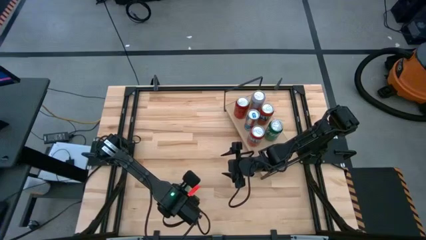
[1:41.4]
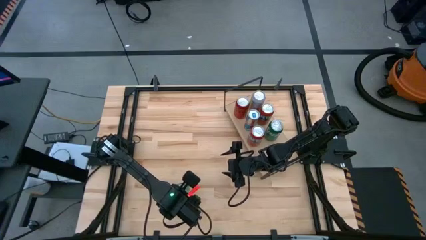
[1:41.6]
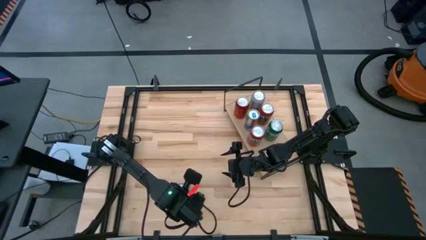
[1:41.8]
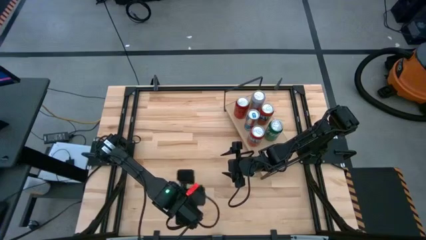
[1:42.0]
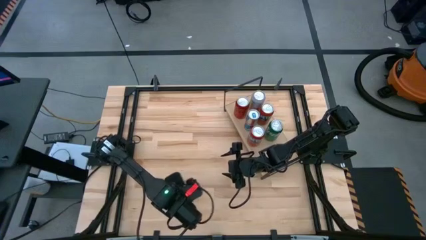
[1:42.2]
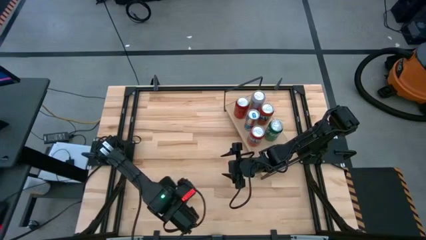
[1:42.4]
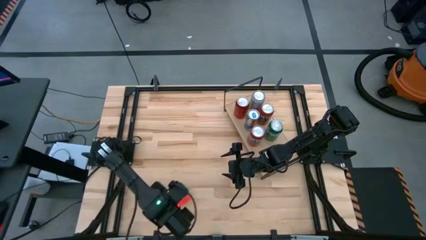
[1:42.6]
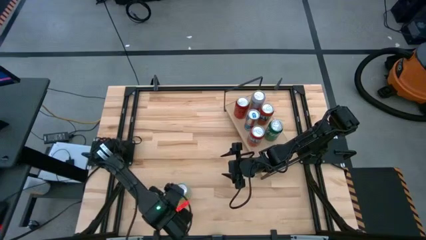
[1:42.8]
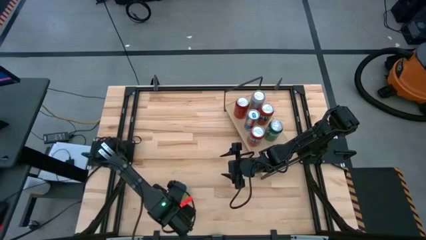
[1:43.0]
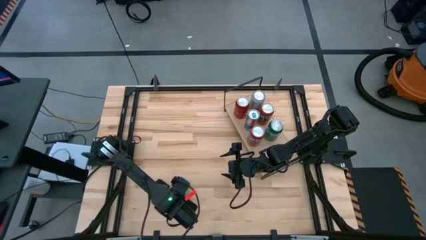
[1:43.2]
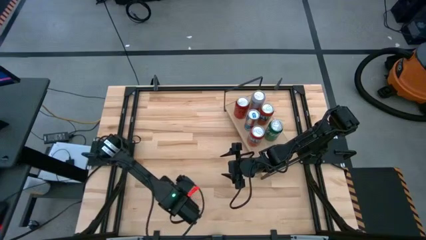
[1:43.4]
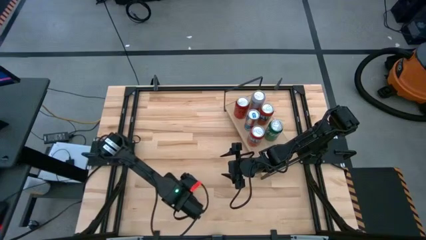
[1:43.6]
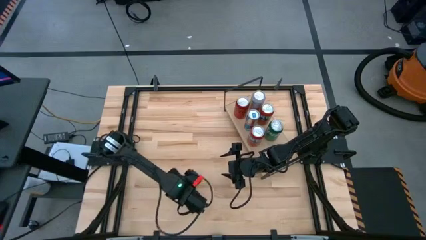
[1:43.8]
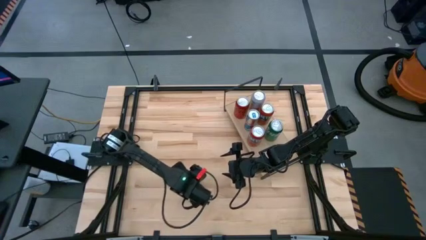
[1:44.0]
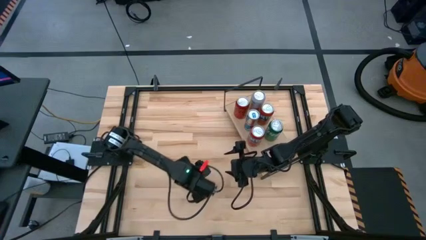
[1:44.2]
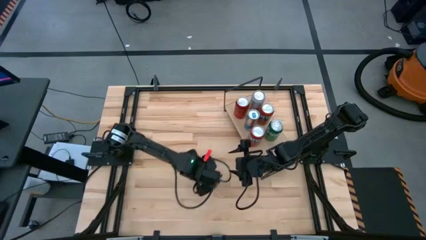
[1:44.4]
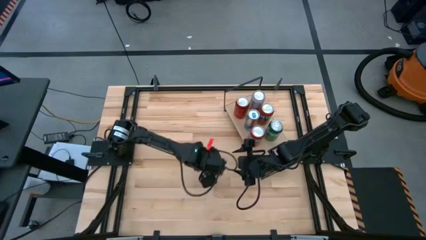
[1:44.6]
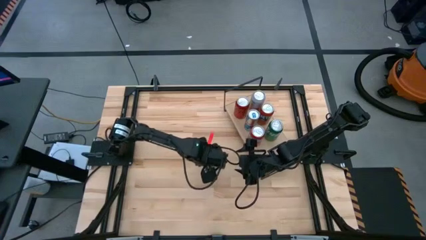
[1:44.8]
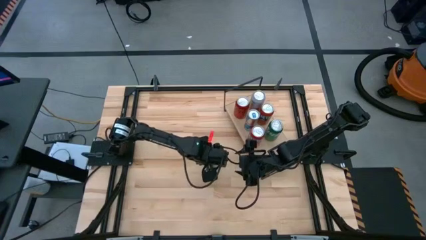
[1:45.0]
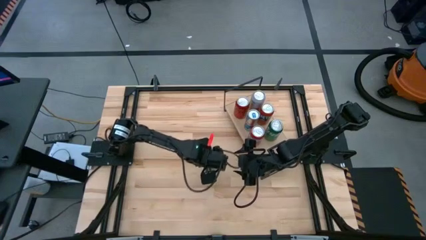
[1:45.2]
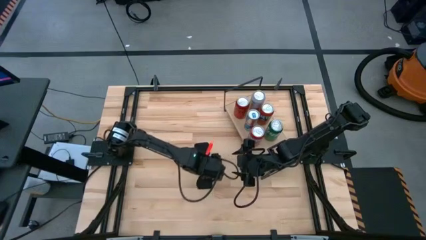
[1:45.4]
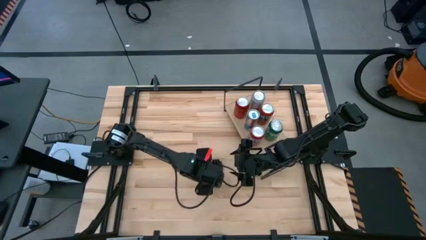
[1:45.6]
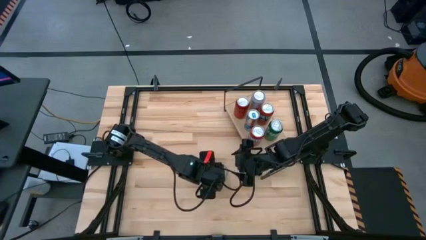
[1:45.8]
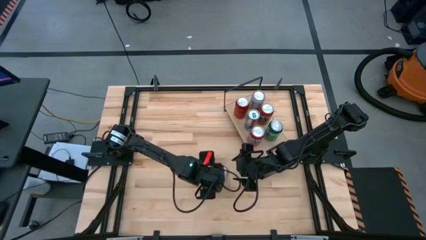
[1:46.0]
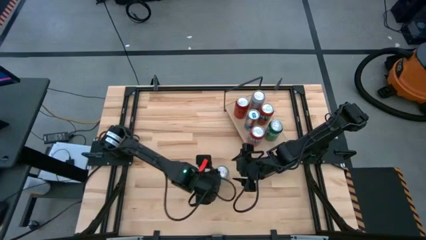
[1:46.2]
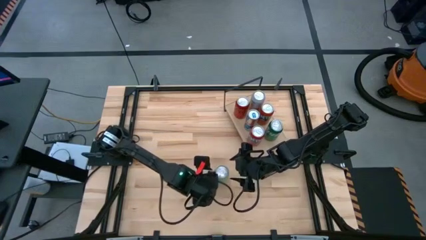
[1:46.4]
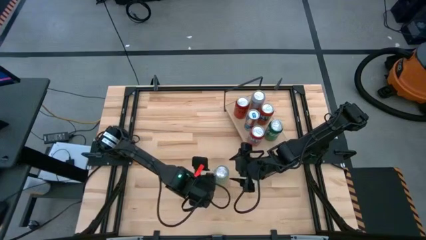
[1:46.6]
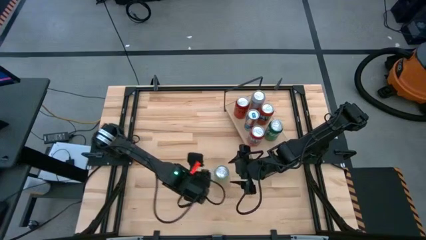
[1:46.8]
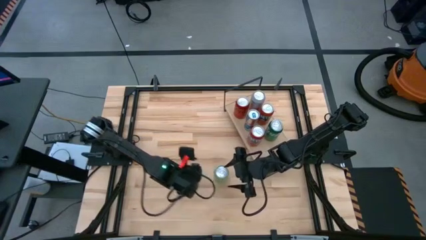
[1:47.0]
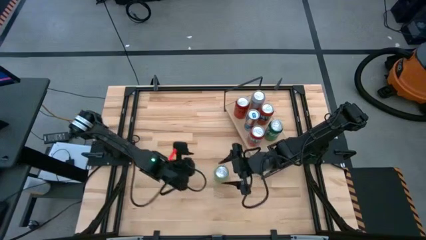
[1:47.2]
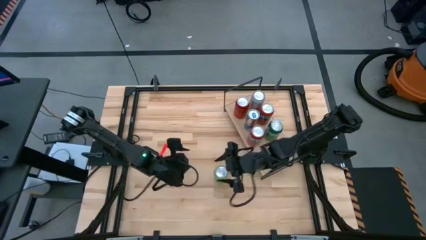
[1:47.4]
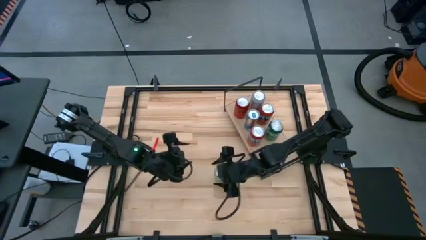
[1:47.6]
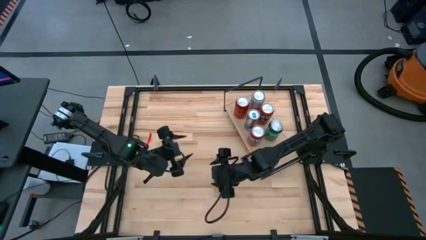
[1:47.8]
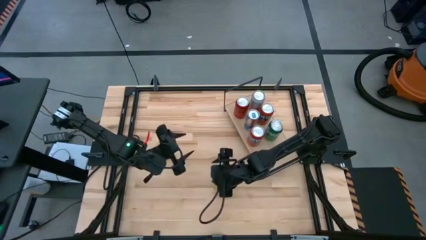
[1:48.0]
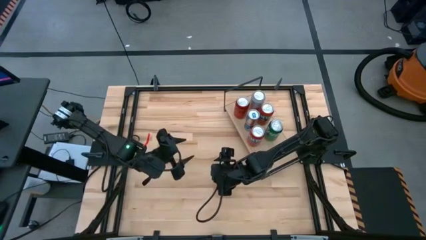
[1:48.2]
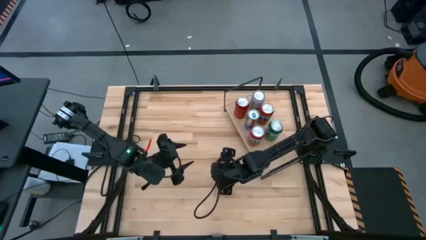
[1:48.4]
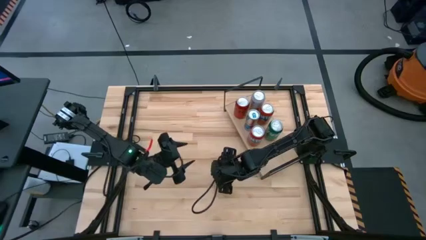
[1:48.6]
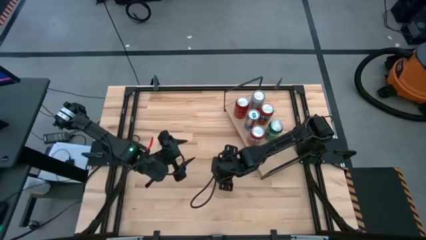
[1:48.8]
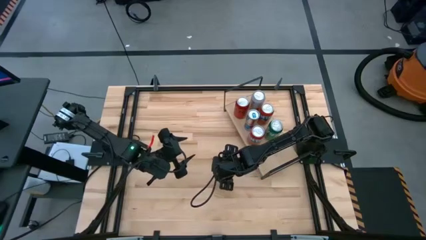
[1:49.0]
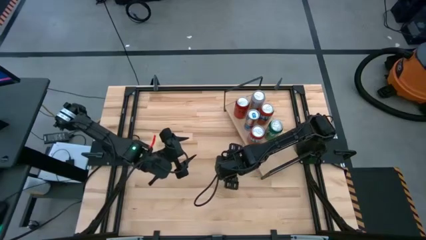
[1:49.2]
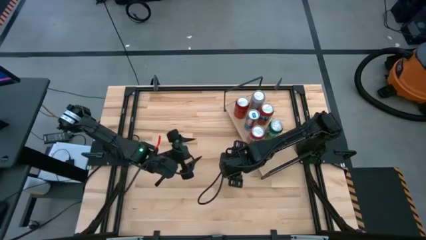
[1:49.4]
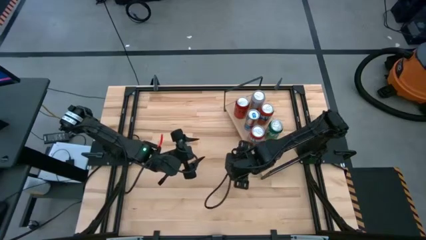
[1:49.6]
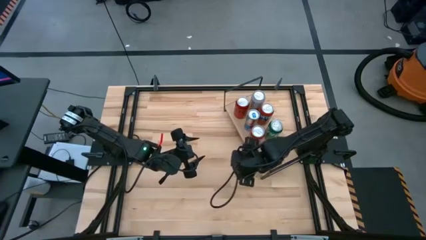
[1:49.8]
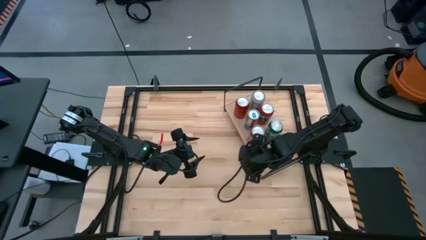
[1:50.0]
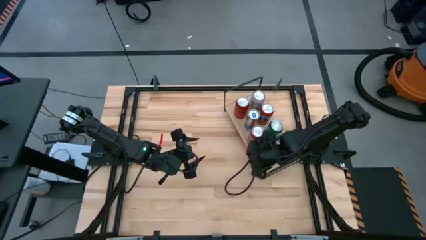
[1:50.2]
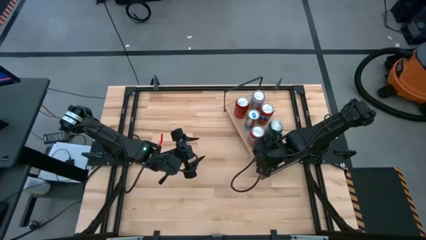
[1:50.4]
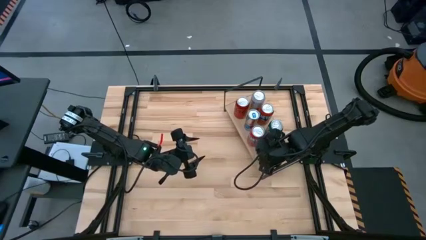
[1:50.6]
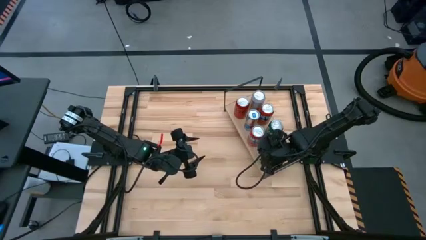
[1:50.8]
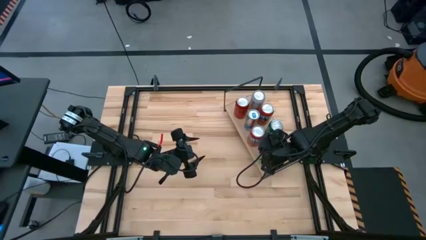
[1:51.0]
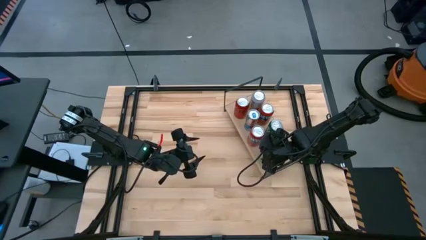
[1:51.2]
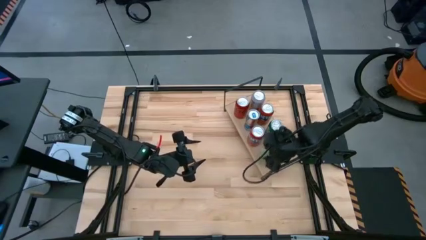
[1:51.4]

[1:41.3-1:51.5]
Task: Place canned beverage on shelf
Put the light green soda can on the shelf

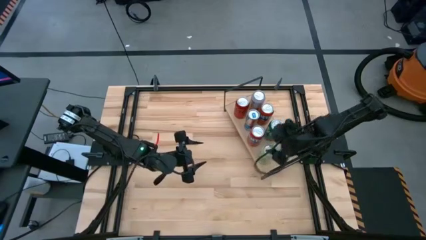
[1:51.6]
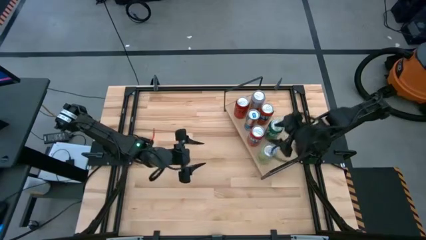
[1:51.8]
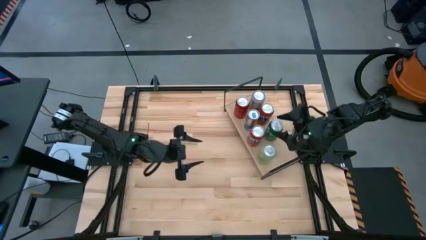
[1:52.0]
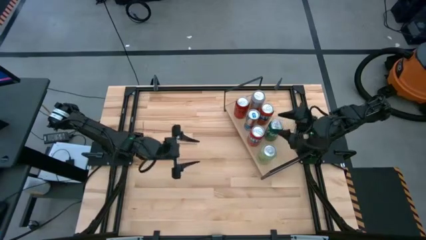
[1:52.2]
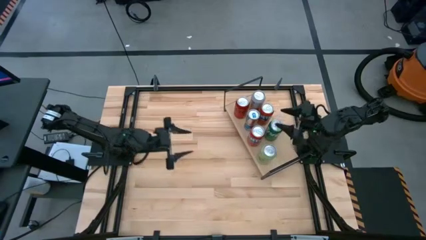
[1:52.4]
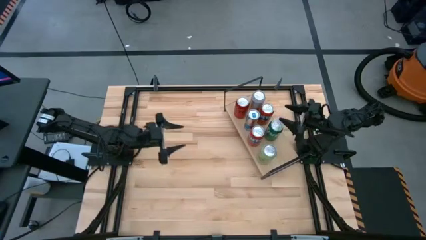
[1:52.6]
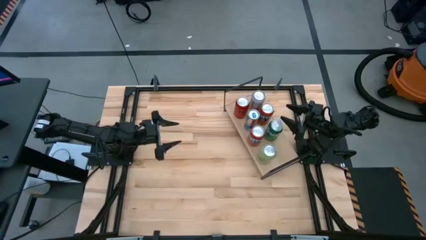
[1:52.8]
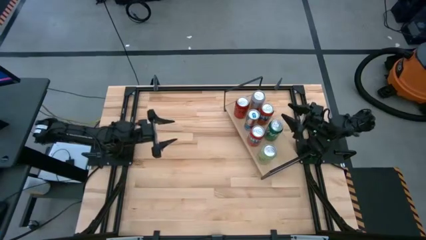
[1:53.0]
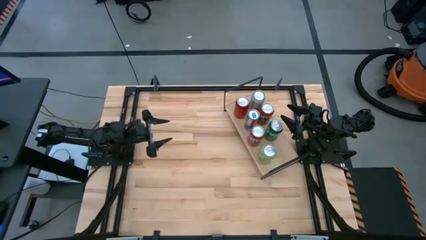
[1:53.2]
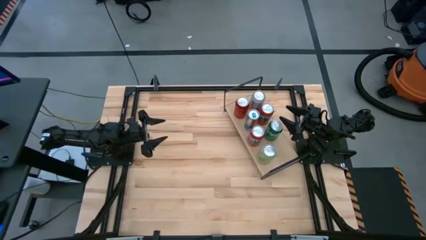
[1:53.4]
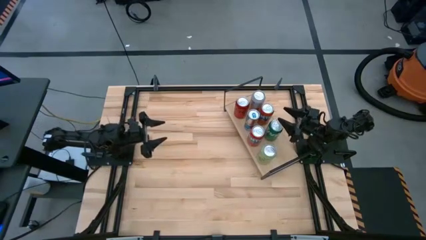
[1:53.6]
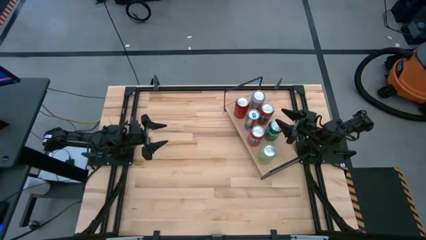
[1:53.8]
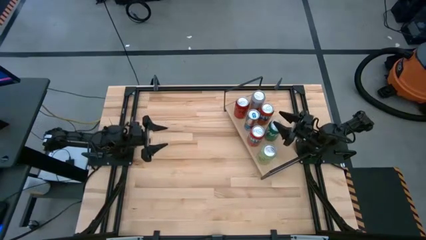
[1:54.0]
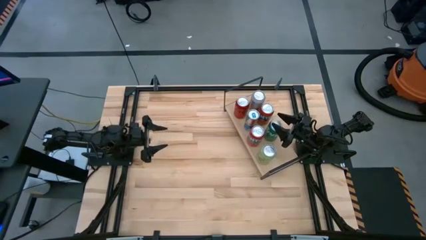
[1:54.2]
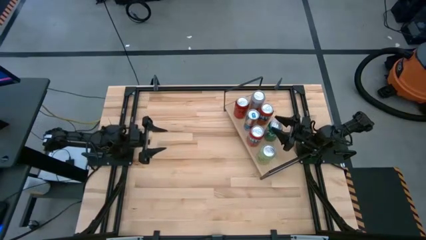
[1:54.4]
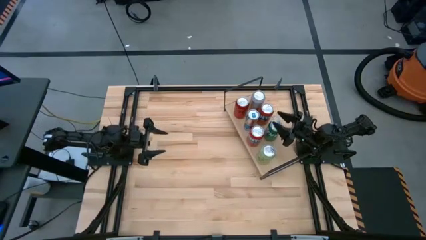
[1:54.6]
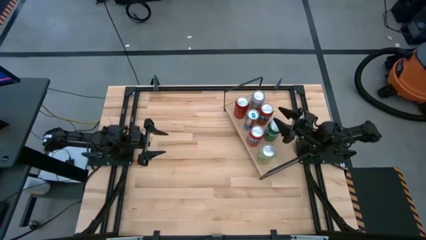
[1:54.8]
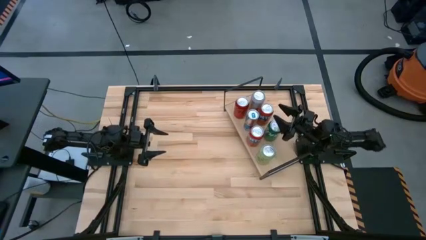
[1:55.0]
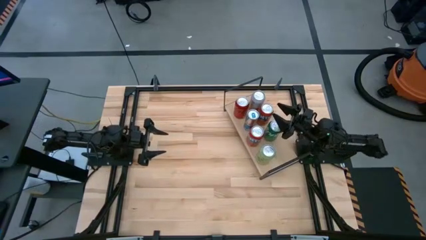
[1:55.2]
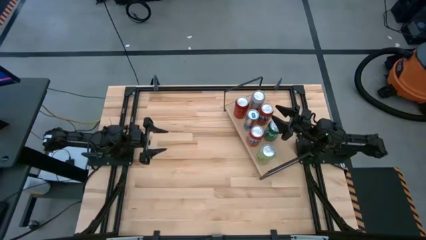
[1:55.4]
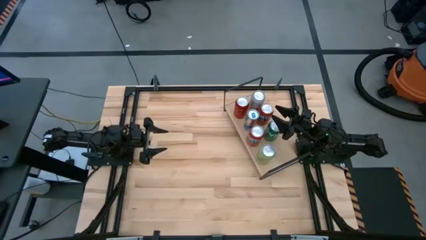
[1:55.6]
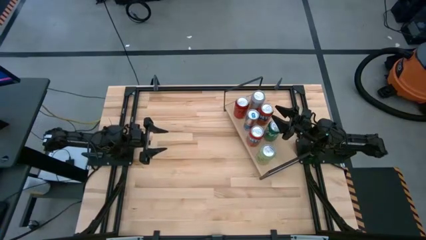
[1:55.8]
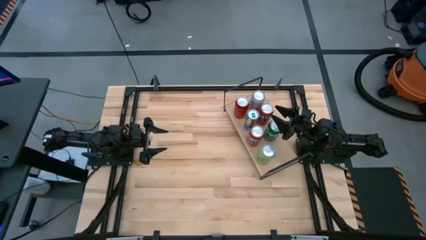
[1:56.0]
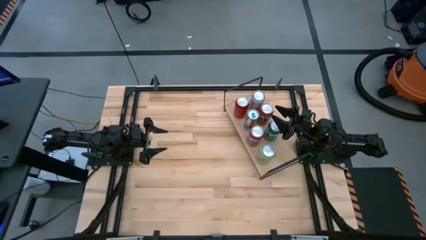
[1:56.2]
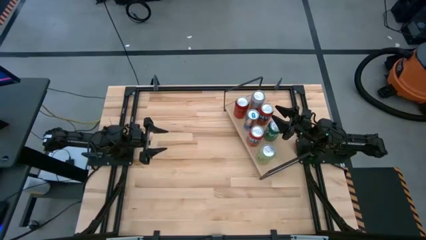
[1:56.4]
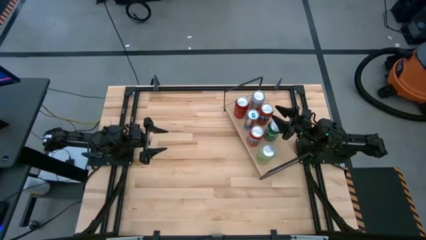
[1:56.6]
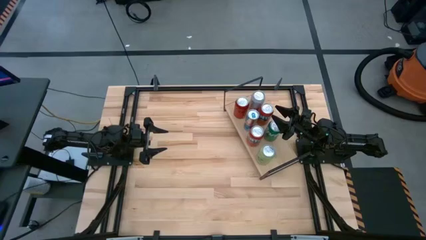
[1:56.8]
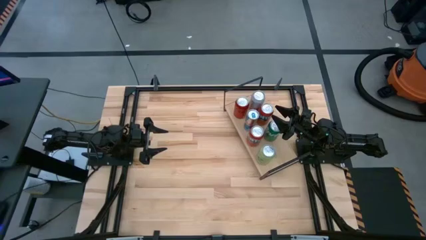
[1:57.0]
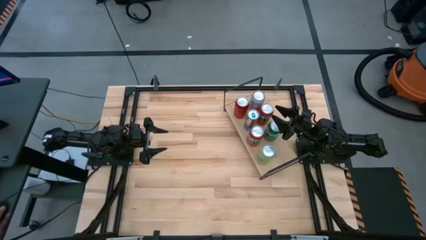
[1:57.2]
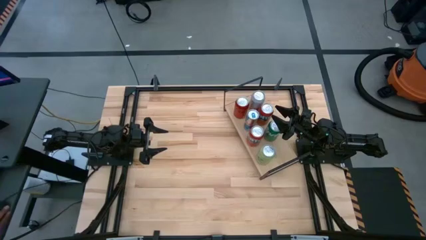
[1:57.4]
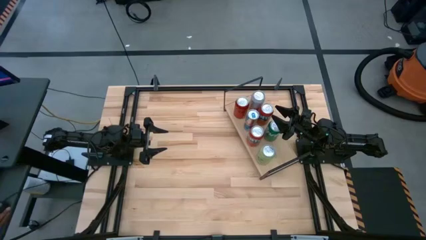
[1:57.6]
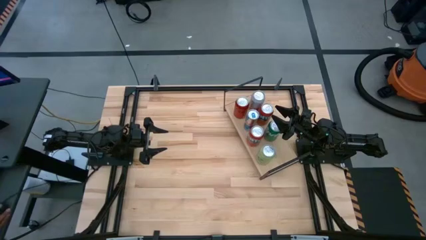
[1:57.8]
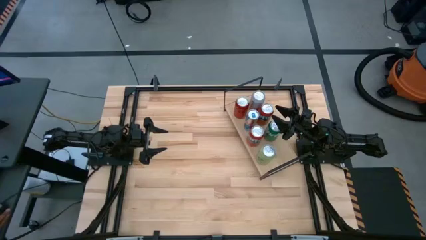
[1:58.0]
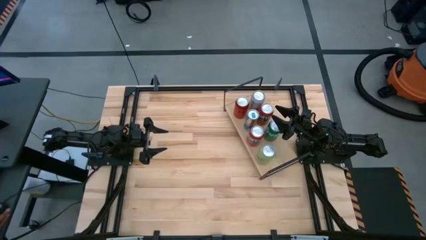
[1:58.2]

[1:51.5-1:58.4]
Return to Home Position
